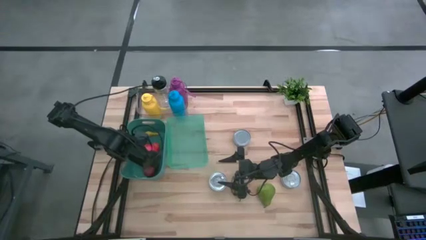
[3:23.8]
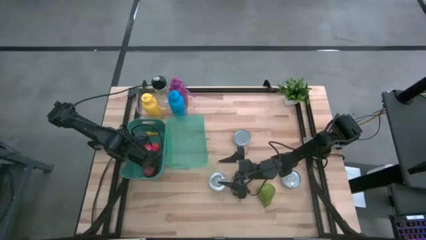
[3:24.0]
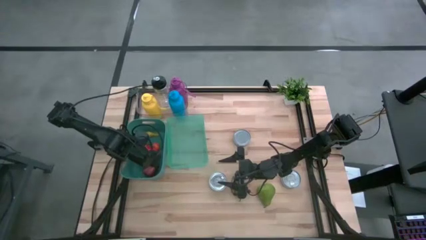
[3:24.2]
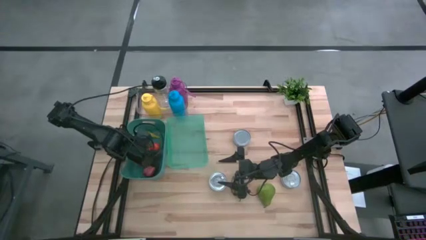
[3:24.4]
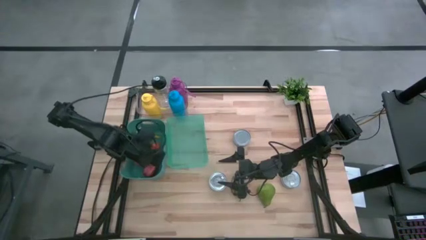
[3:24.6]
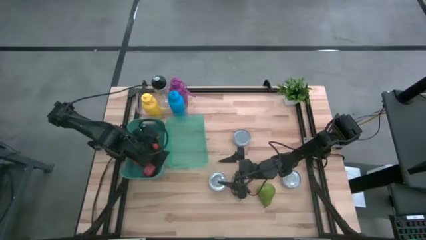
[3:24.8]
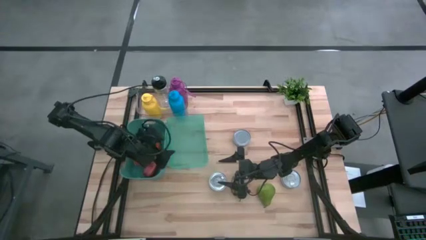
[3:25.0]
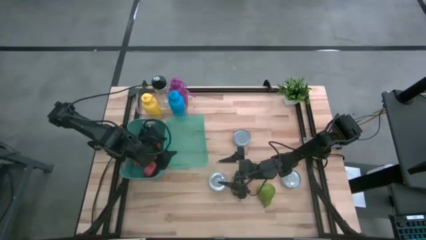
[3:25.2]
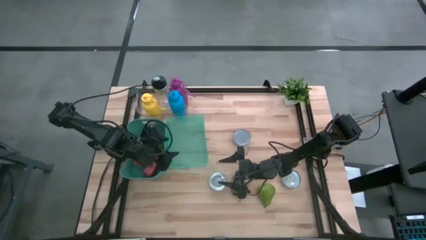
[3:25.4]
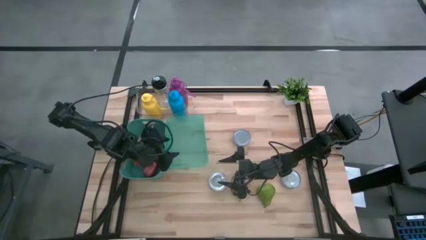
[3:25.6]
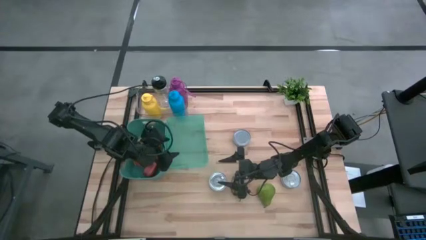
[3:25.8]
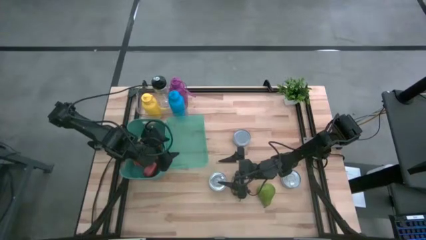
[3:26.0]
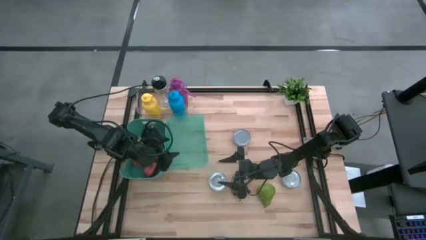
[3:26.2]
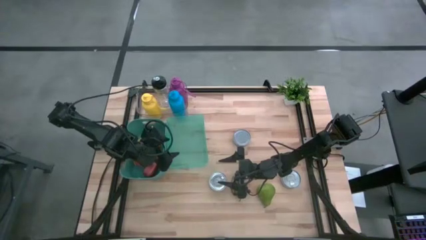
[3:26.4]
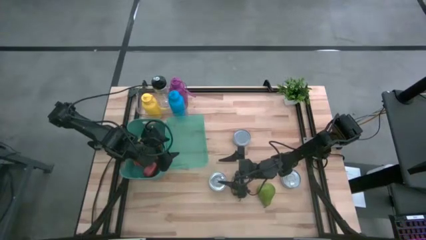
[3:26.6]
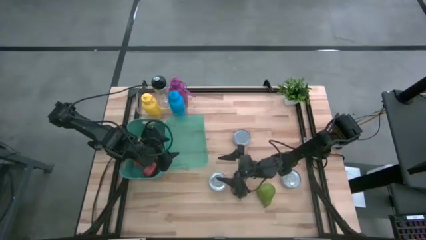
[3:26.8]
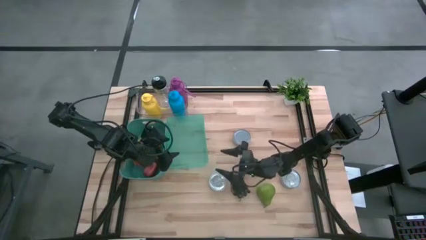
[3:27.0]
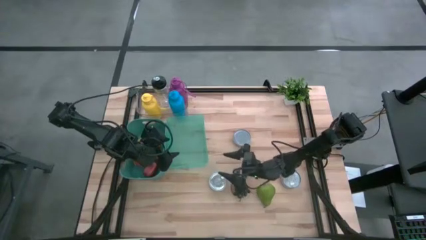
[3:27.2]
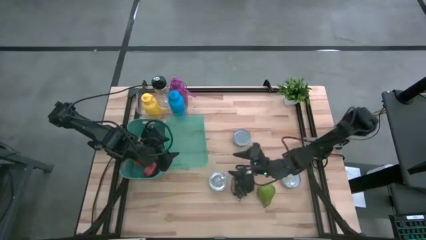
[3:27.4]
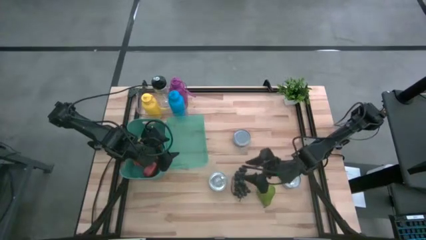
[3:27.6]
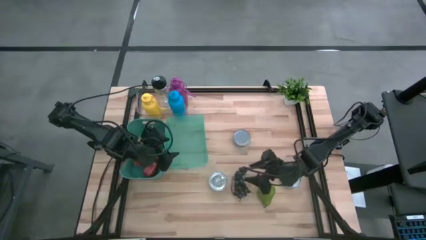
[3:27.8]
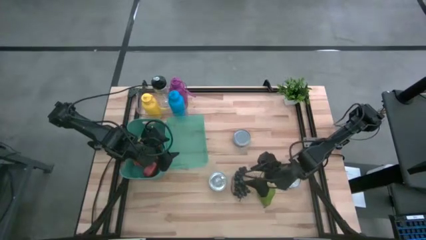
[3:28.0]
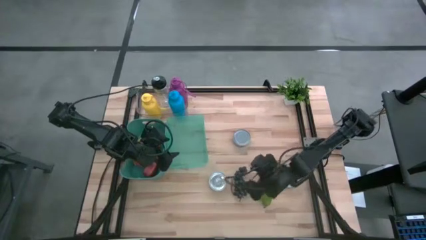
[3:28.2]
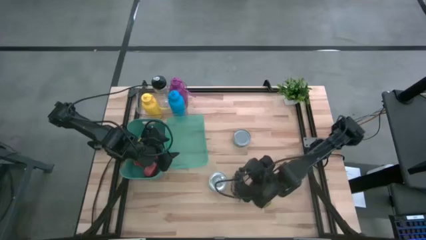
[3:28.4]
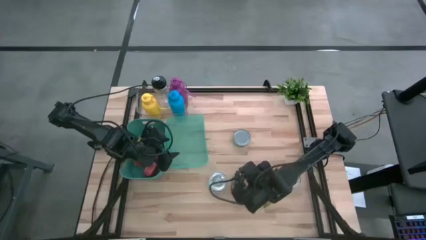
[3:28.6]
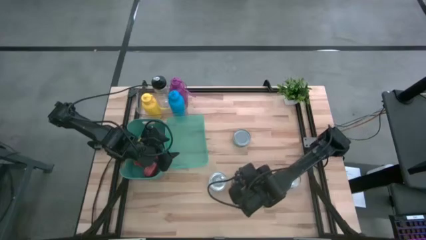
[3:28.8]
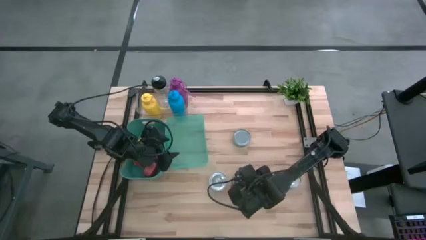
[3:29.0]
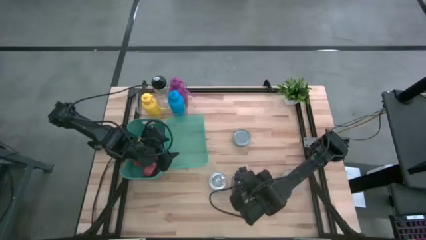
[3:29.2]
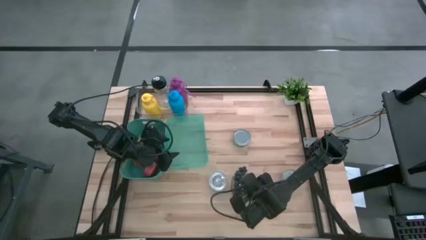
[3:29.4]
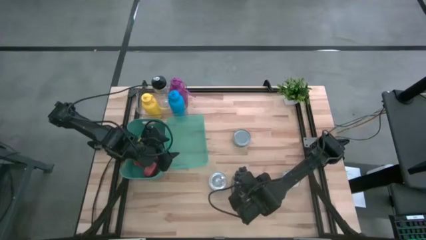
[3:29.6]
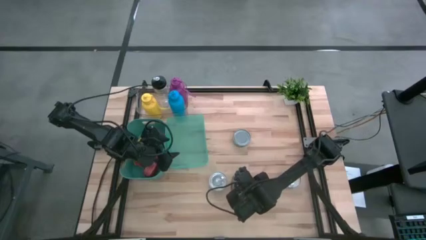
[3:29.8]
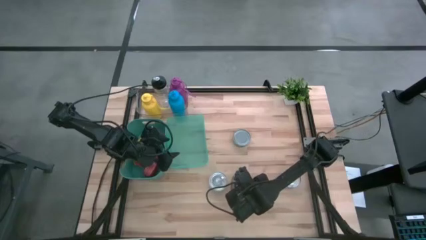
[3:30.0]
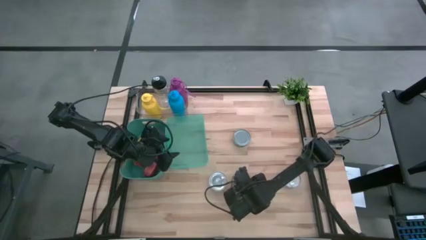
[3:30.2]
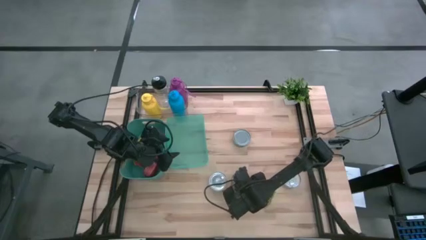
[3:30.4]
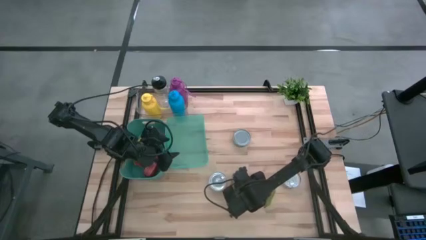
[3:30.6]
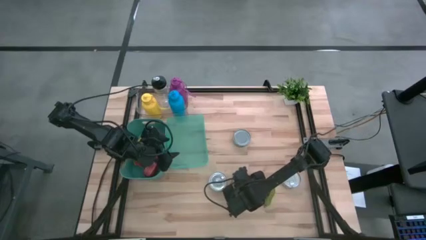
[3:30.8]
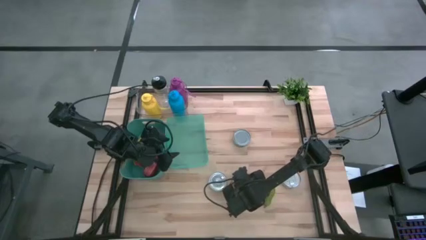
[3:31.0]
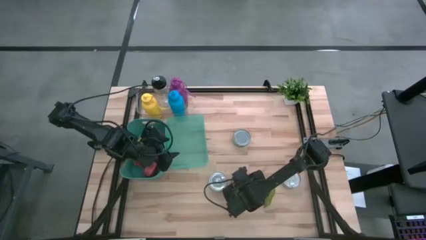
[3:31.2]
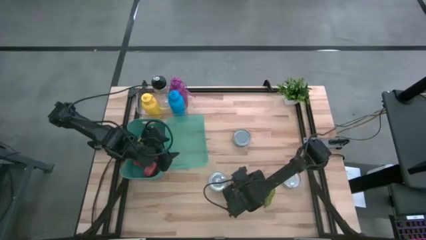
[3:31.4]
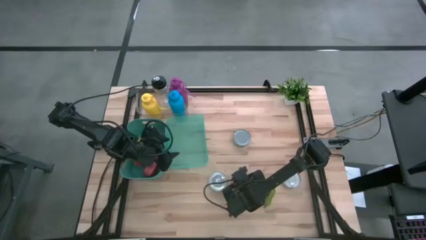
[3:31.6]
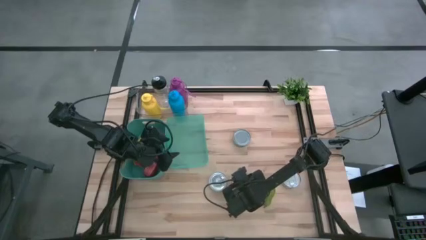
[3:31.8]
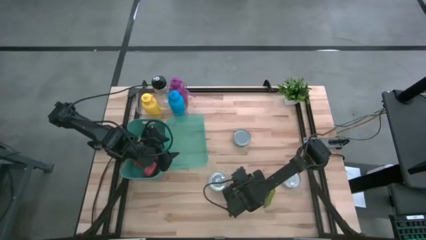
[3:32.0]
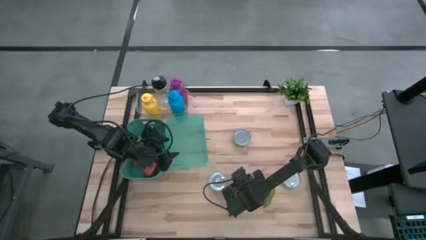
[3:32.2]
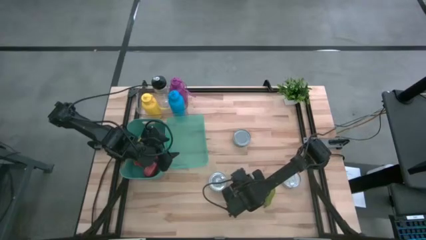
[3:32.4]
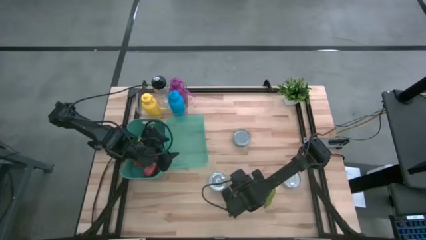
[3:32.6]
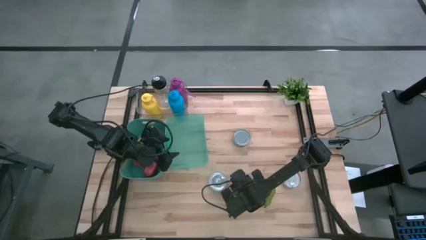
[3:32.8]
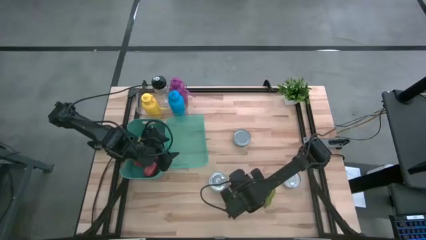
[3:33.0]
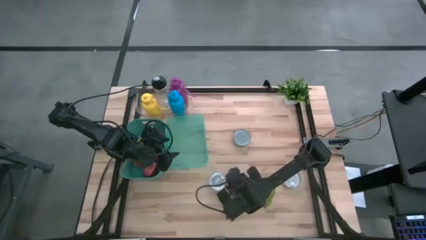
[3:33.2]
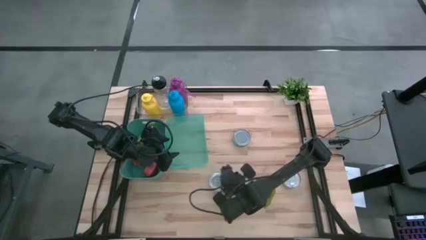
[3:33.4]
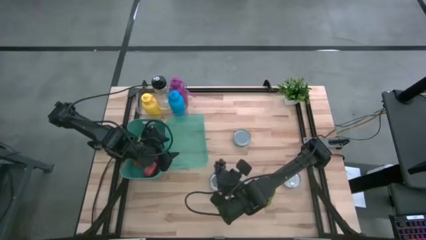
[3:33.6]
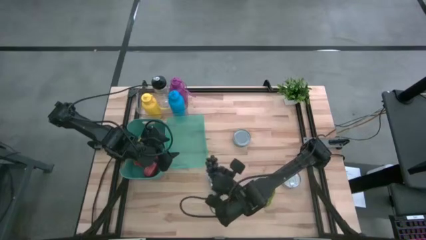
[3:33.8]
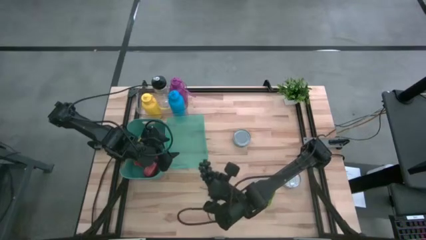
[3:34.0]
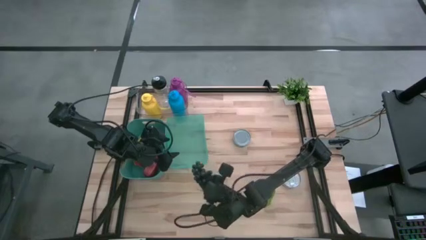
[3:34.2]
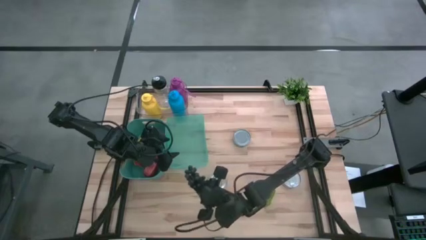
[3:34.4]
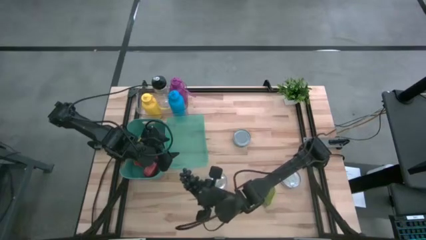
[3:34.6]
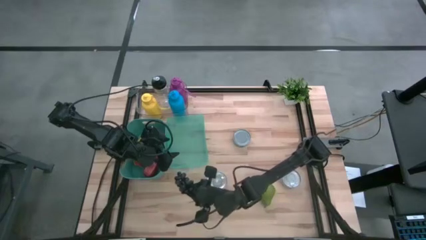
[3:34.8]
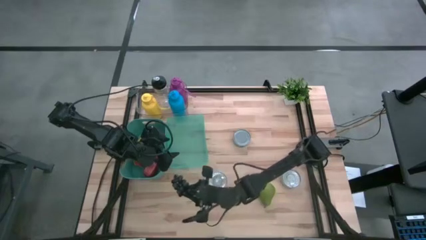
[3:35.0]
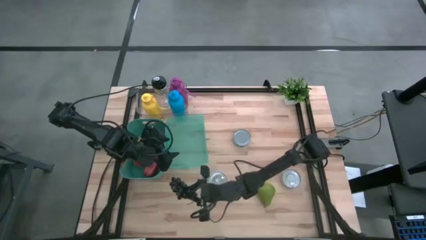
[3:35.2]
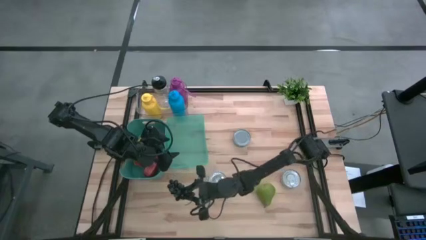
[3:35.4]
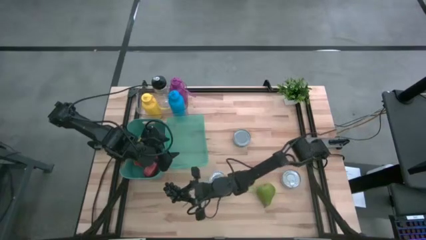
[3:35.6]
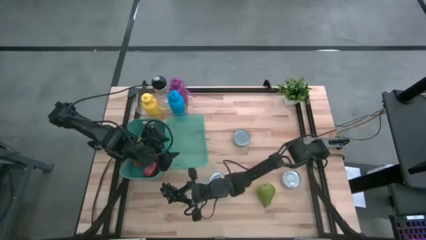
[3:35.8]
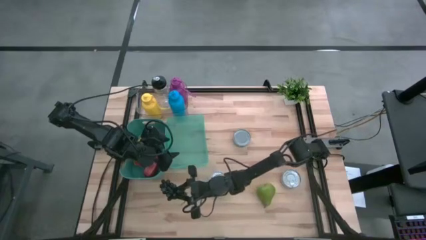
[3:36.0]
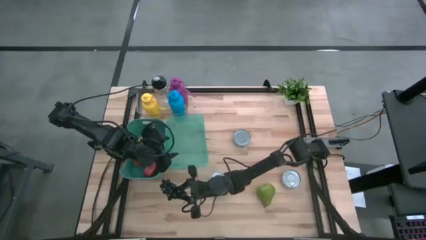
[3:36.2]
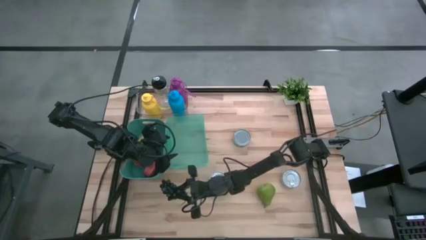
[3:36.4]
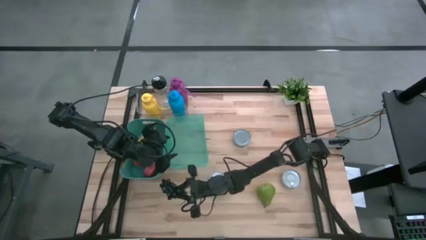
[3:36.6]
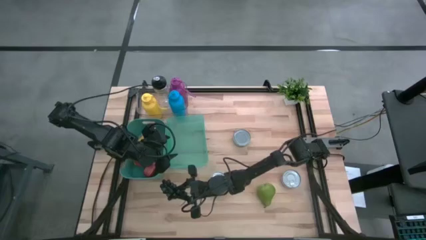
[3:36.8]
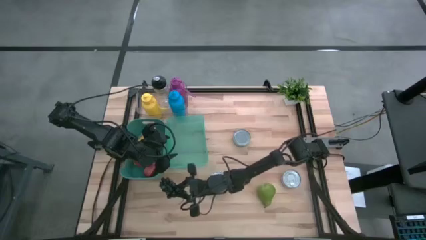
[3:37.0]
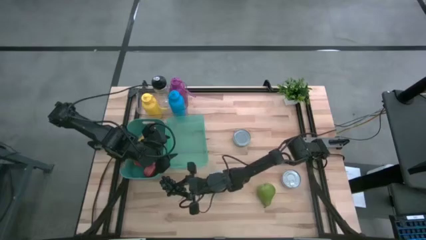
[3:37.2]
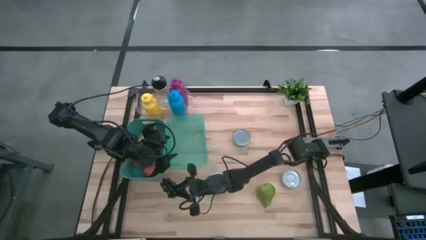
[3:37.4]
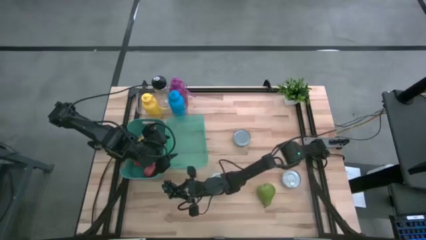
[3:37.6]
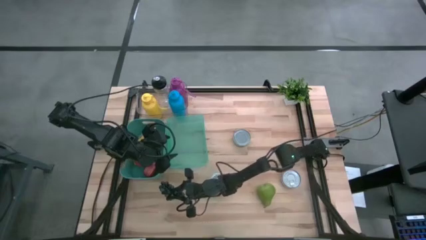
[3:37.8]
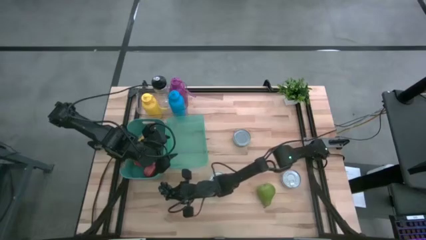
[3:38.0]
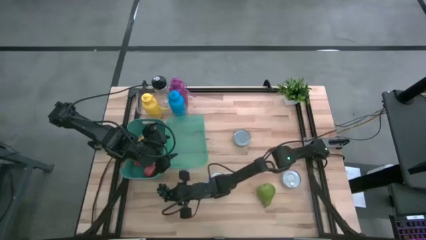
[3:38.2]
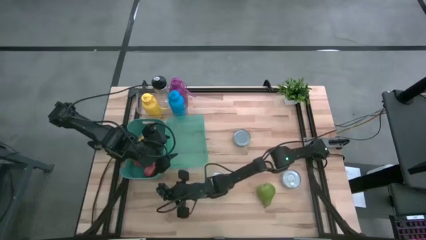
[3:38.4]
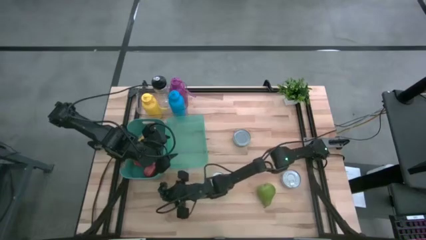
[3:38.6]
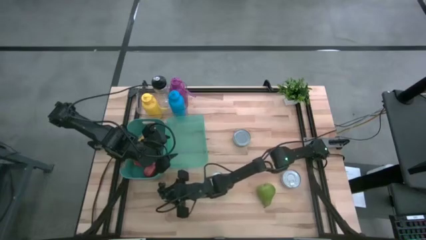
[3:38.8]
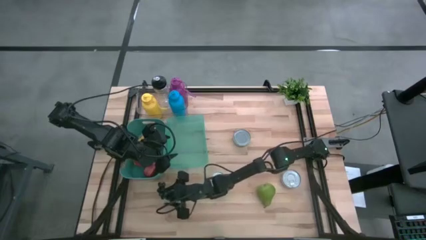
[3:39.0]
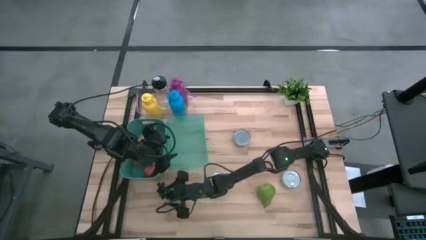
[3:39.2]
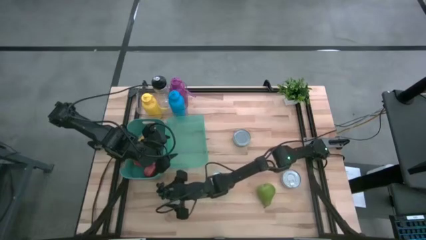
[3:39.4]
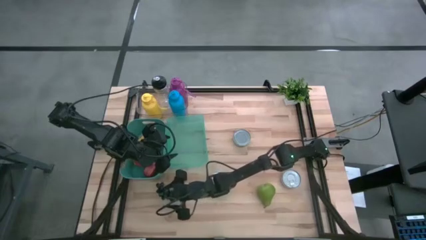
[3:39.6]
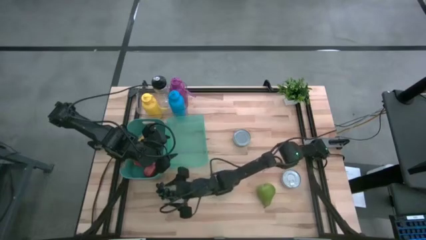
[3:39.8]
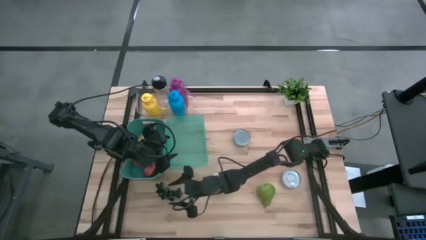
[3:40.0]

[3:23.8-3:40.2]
Task: Pick & Place Food Item
Put the grapes into the green bin
